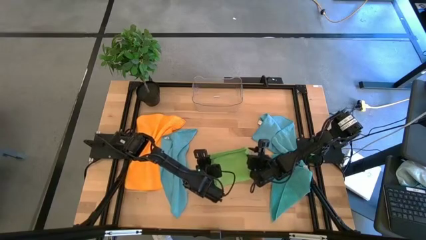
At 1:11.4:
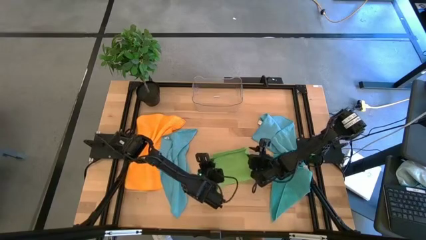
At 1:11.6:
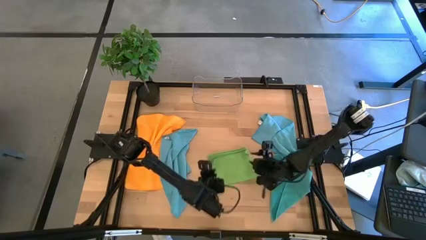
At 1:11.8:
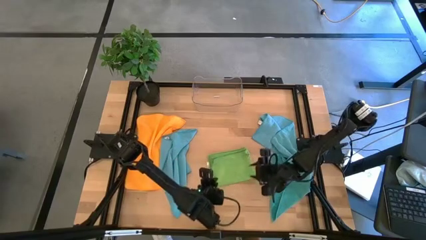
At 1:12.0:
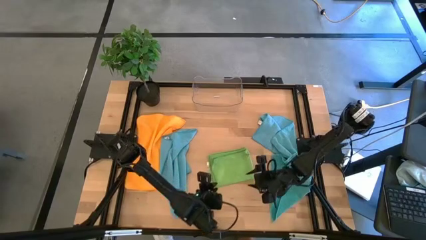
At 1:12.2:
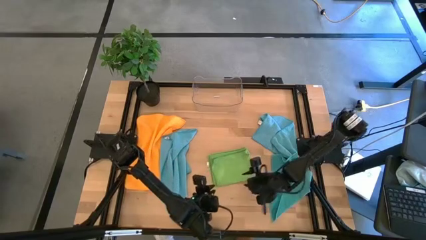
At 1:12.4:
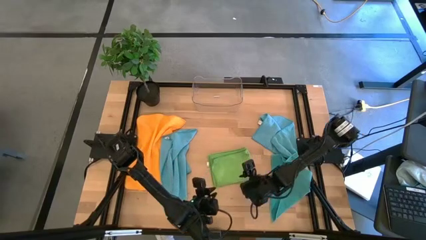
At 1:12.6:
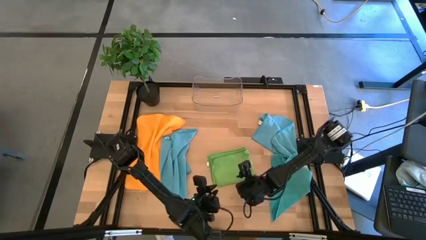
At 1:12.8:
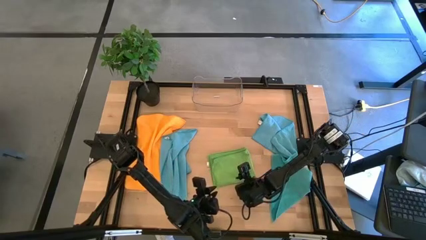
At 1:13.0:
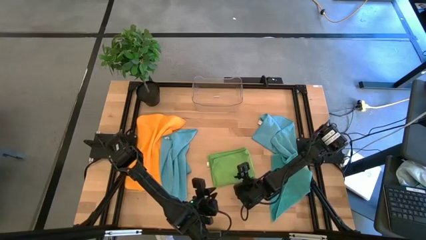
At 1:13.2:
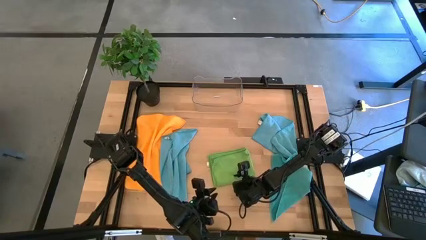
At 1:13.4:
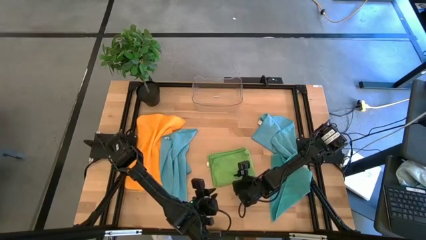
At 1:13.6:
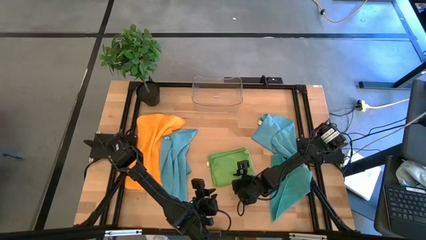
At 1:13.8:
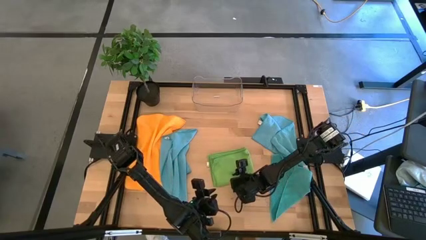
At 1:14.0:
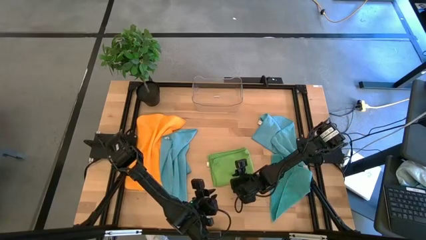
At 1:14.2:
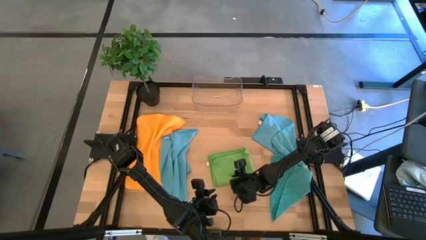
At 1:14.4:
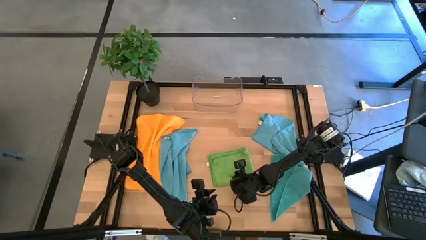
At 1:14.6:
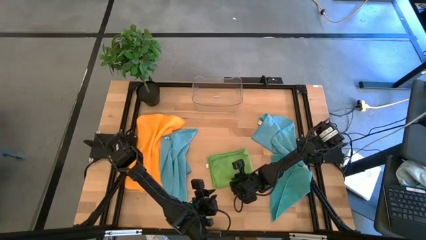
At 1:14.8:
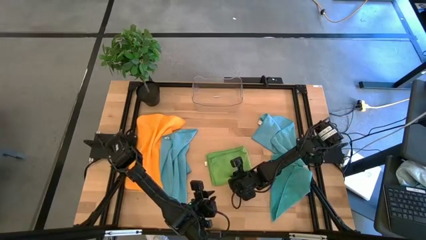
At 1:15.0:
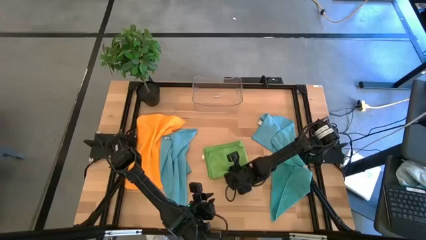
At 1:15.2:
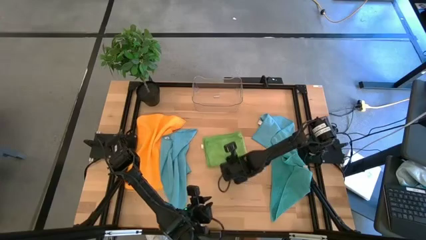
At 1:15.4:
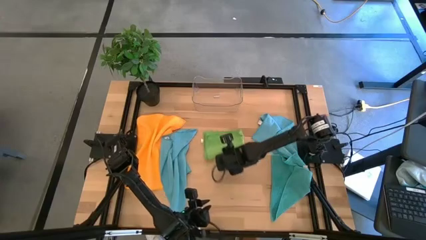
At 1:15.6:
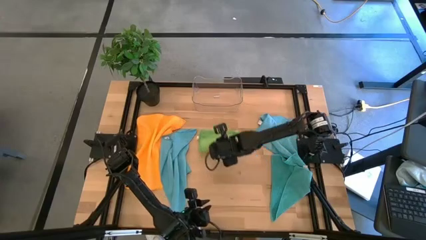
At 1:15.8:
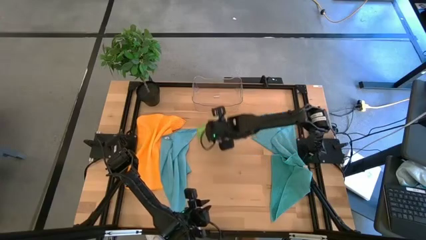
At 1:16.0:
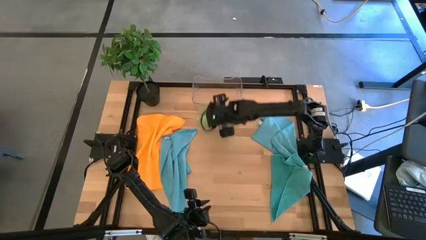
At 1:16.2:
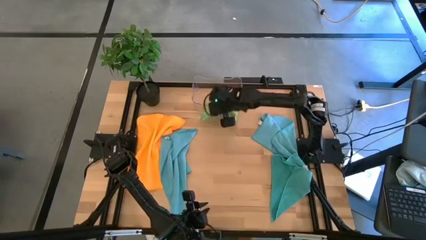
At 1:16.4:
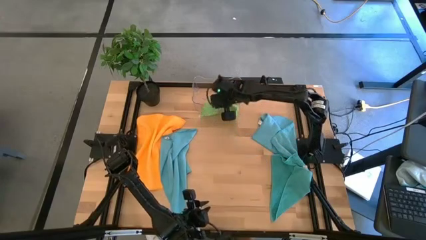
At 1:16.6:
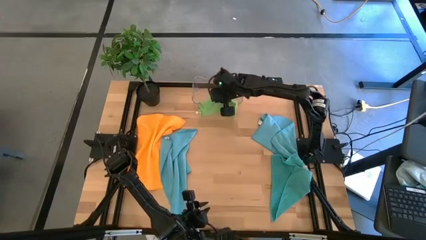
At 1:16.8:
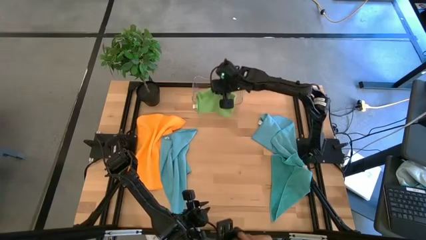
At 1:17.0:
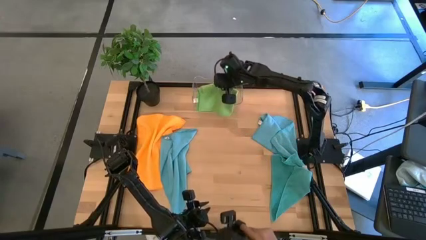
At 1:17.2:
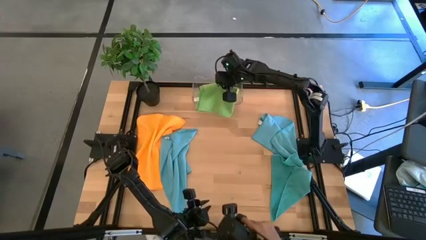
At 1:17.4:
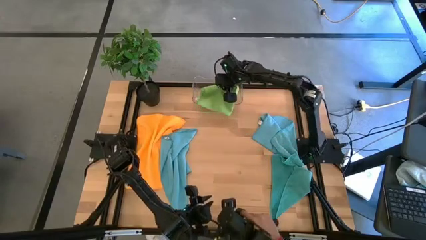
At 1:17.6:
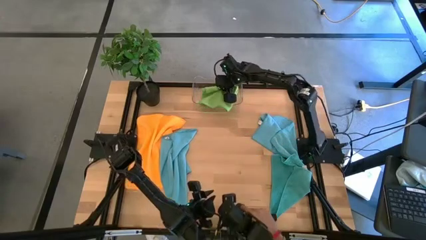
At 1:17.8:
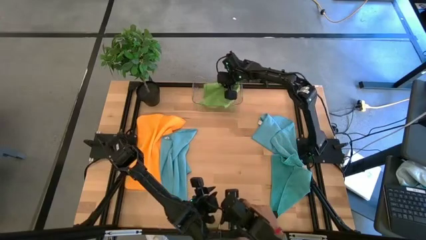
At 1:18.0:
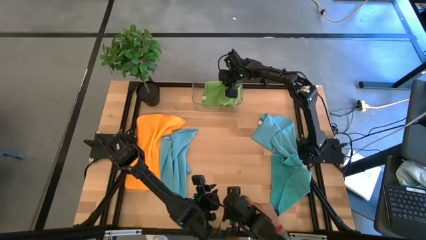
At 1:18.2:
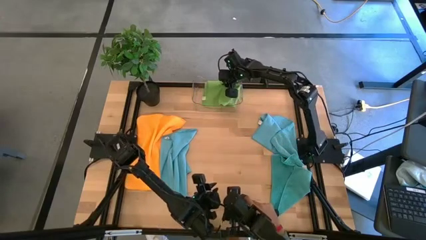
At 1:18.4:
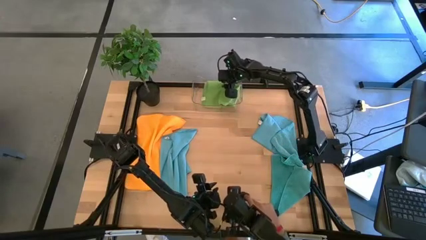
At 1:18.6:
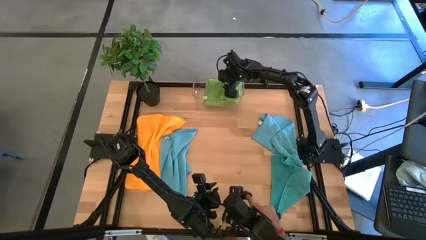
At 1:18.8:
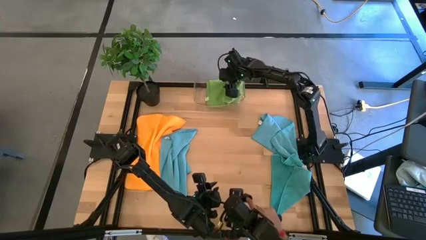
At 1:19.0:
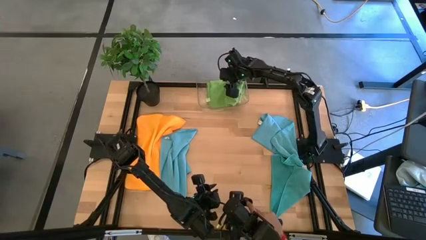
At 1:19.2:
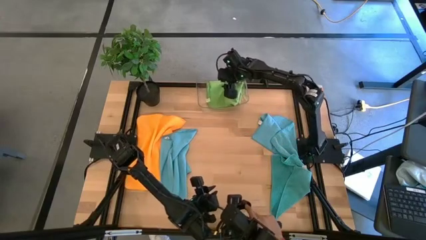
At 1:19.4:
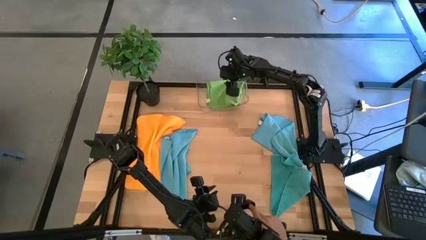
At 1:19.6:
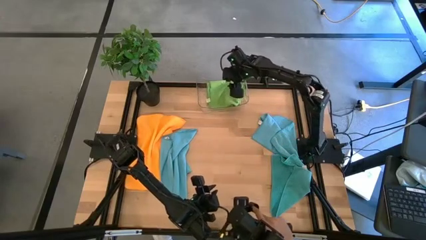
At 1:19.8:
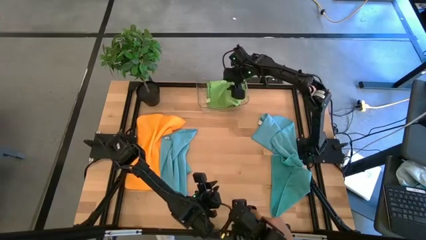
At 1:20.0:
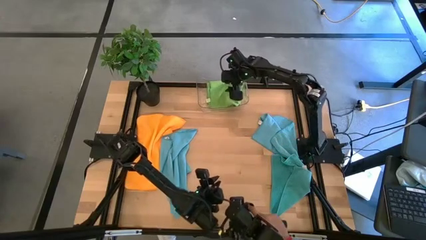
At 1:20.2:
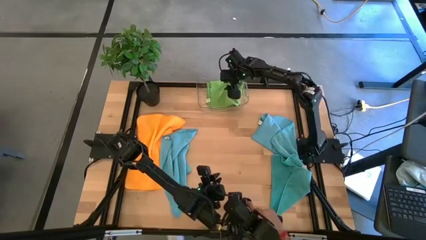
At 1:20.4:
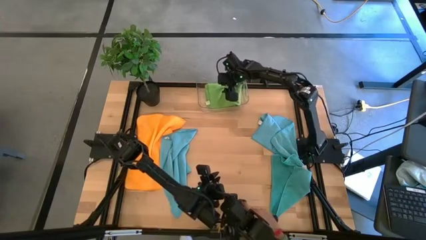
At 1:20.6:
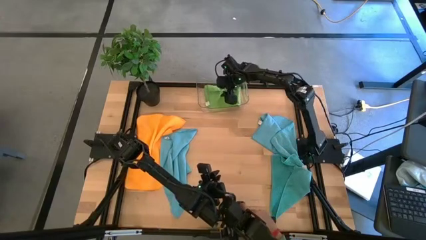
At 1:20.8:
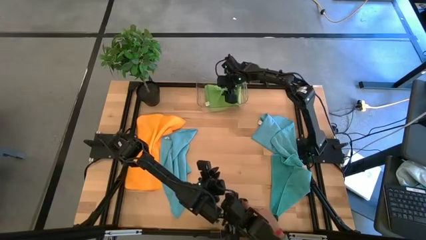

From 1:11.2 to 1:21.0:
Task: Fold microfiber towels
Put the folded green microfiber towel into the transparent bin

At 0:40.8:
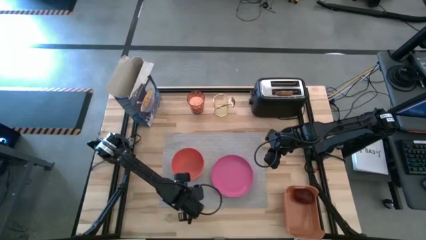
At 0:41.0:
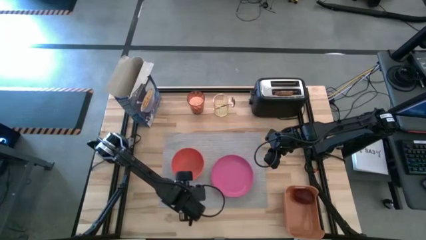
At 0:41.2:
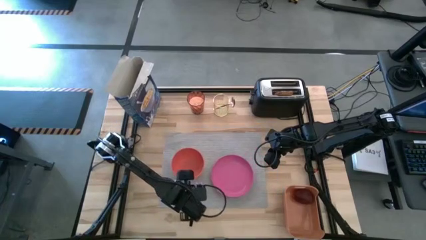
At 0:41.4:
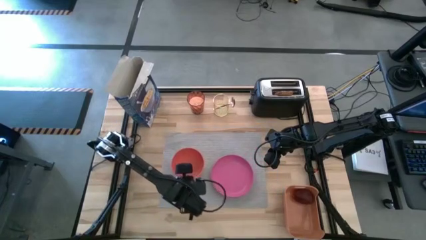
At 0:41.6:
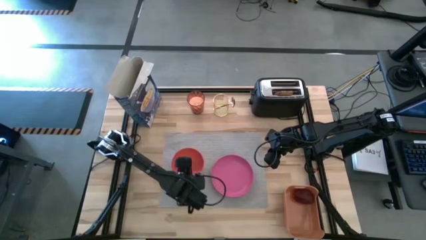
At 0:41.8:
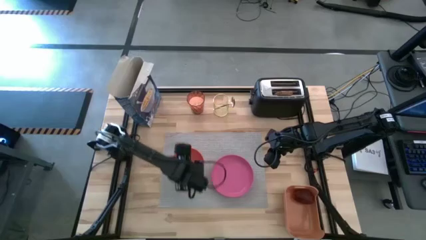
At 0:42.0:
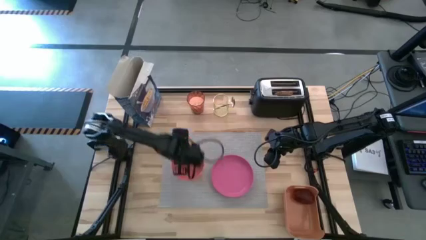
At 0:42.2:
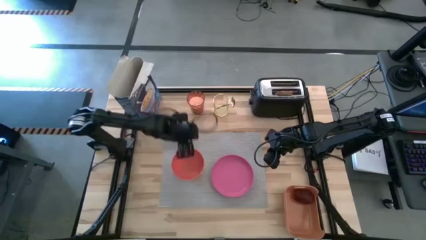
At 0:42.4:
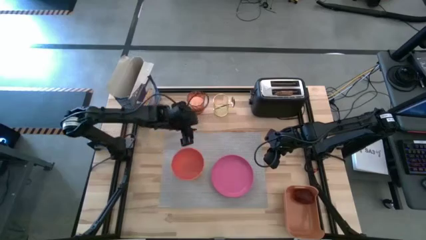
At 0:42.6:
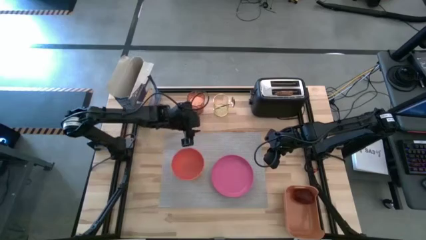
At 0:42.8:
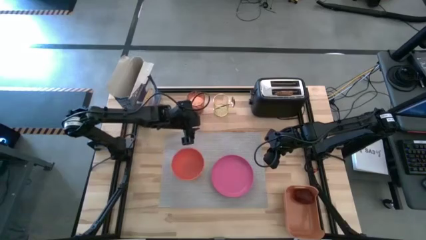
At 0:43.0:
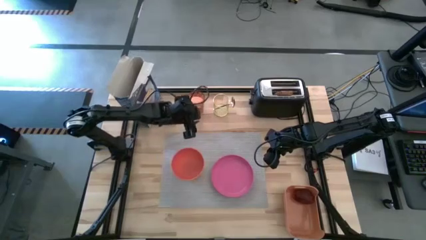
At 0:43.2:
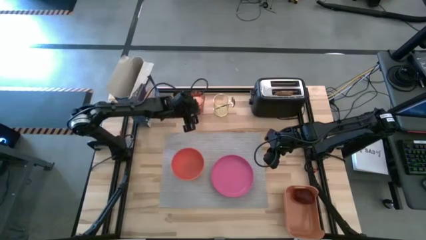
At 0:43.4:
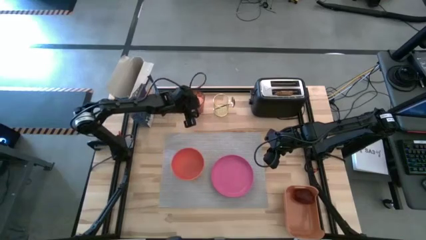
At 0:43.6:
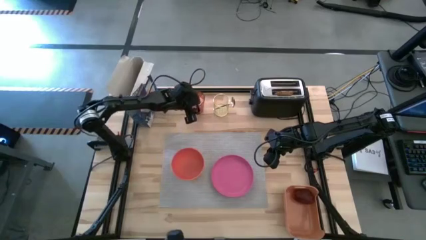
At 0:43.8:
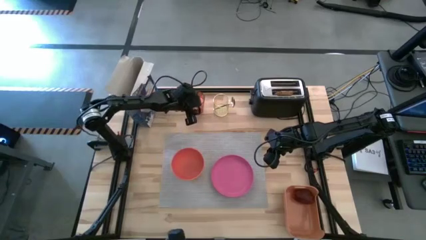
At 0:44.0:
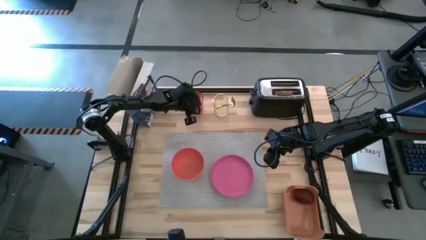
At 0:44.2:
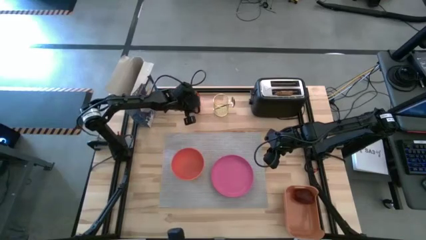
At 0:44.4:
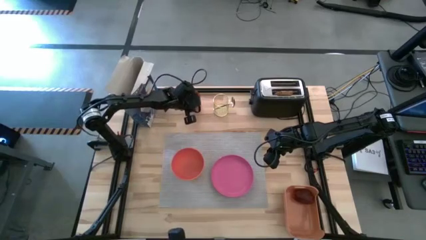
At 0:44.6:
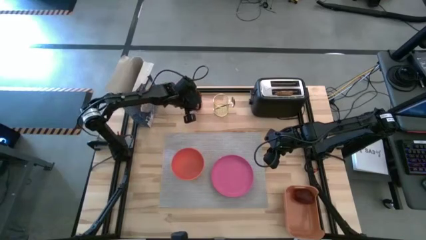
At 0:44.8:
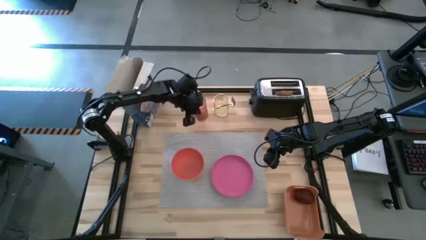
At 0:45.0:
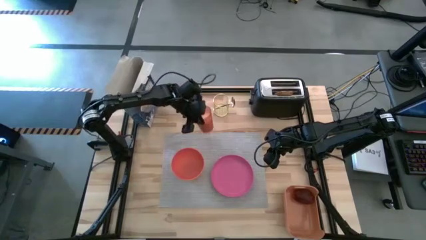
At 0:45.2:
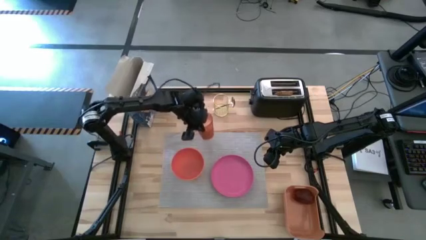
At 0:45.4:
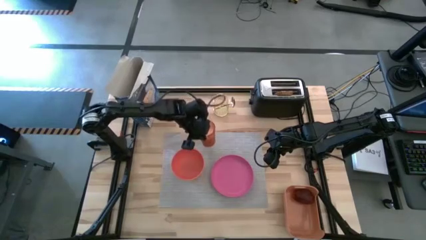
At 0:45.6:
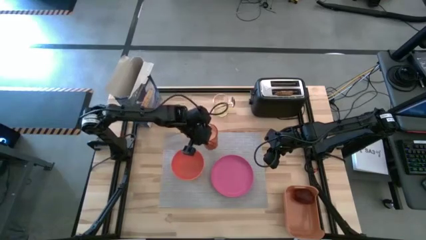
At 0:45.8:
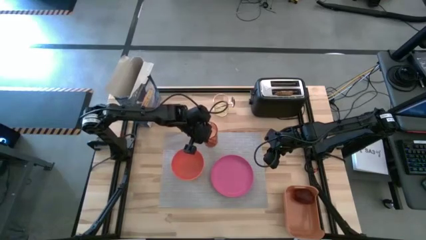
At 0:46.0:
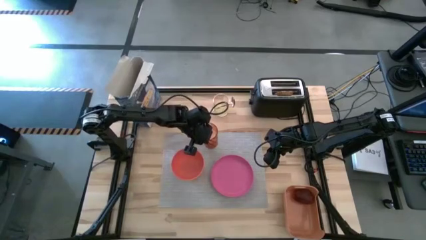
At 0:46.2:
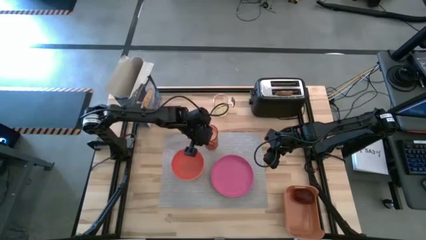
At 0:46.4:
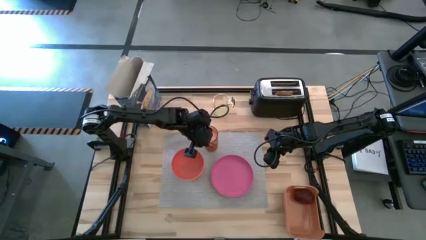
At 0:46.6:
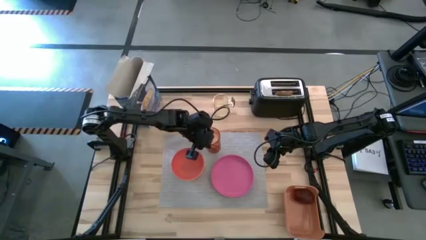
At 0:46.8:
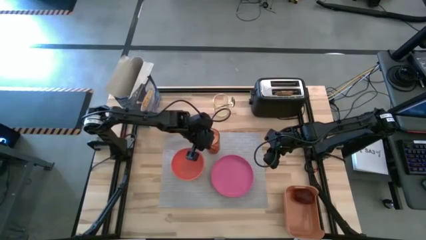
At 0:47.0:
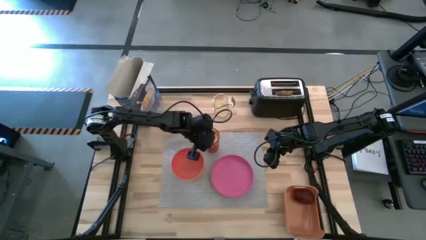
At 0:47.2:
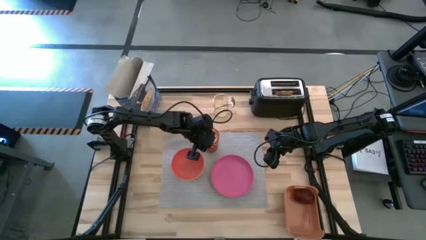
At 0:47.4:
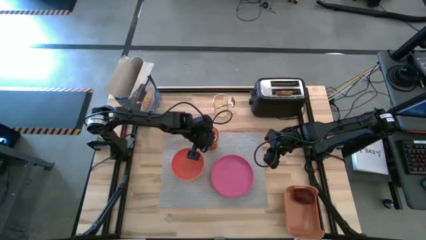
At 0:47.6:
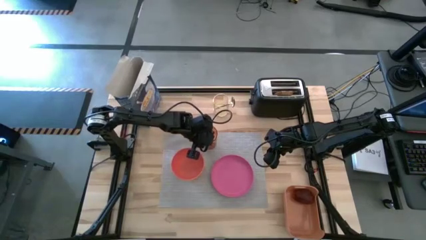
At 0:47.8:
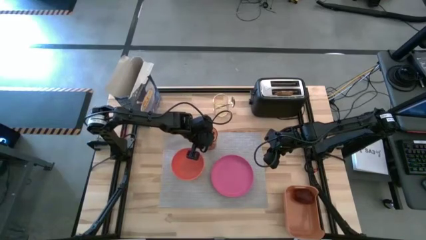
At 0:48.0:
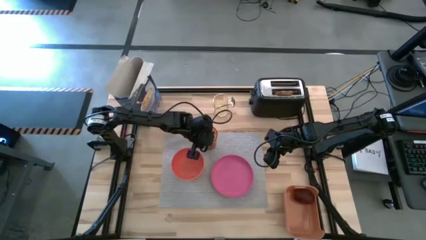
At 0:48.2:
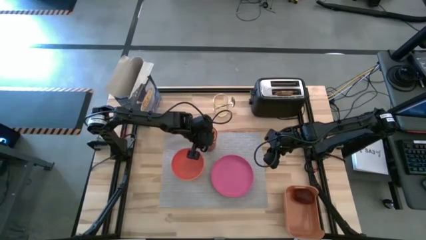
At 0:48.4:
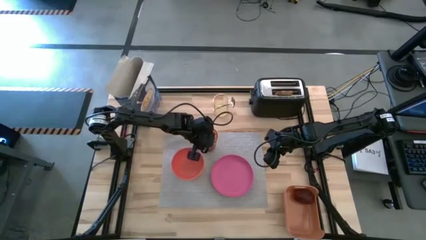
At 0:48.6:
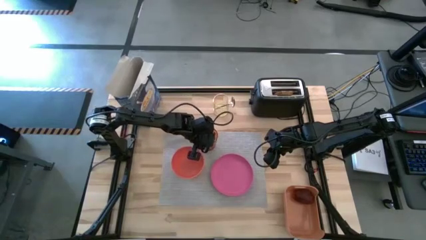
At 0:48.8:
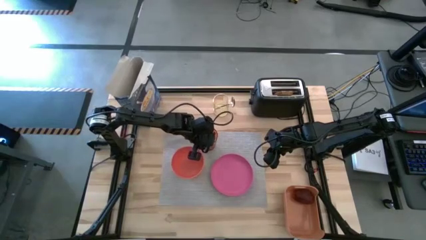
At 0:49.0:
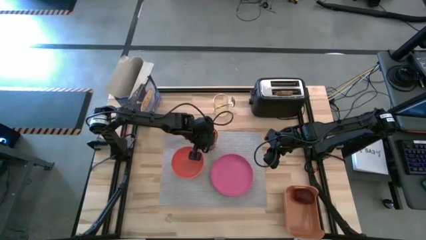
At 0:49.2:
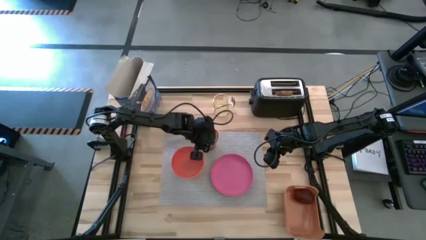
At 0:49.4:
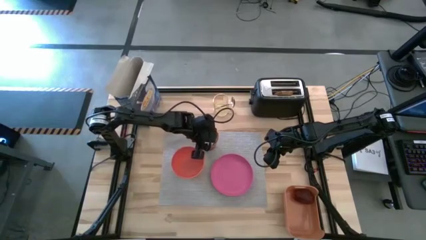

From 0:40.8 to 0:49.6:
Task: Arrange a breakfast setting
Put the orange cup of milk on the gray placemat
